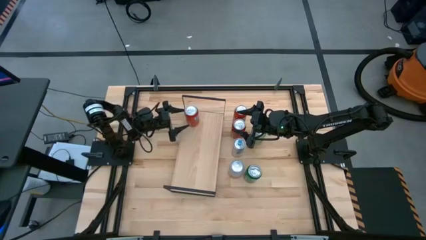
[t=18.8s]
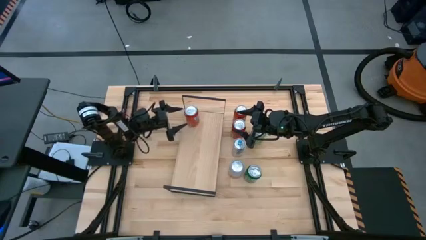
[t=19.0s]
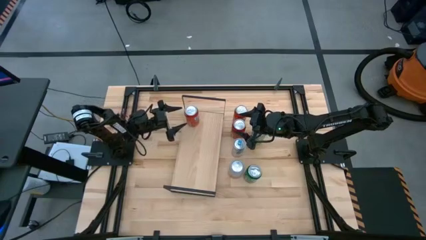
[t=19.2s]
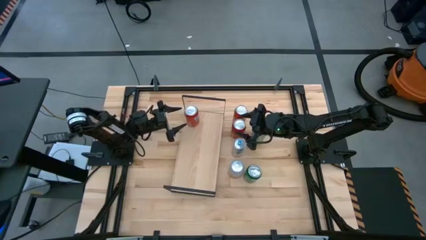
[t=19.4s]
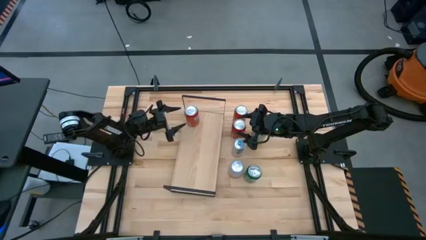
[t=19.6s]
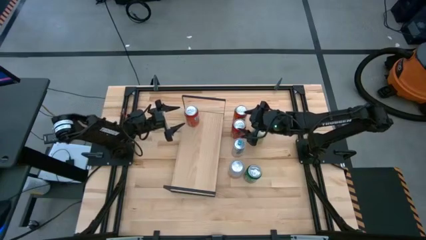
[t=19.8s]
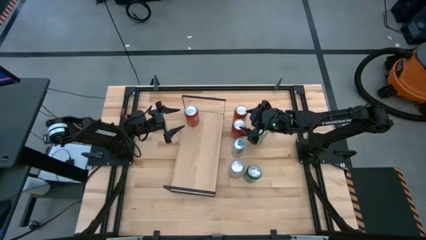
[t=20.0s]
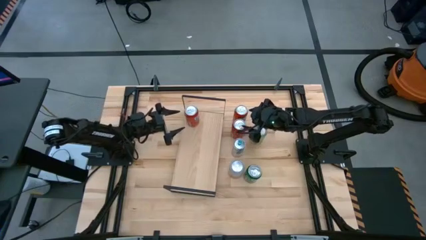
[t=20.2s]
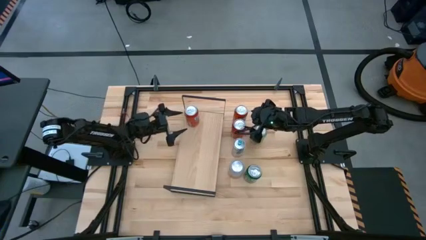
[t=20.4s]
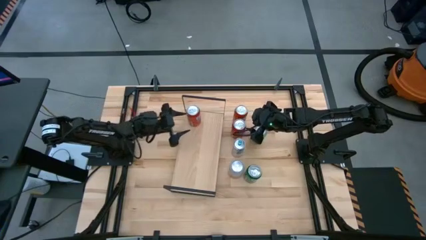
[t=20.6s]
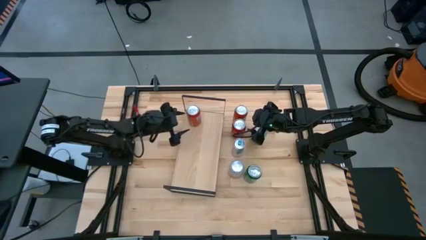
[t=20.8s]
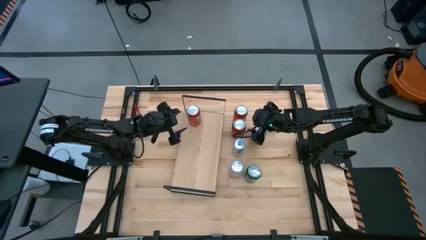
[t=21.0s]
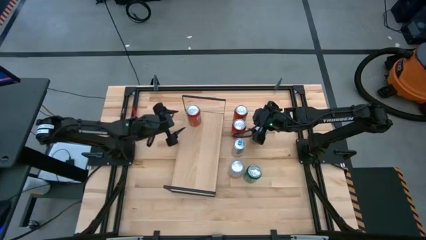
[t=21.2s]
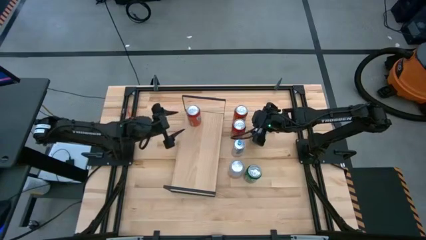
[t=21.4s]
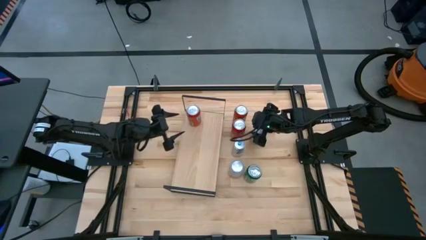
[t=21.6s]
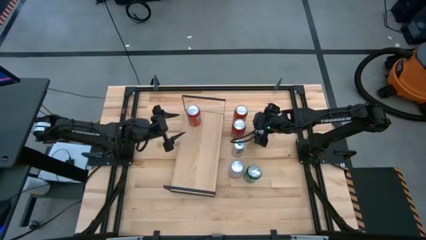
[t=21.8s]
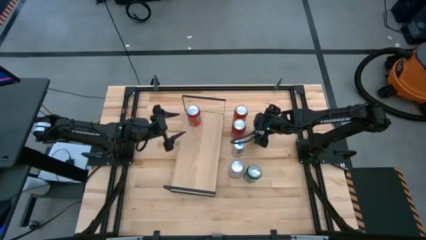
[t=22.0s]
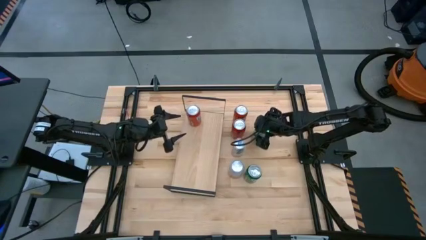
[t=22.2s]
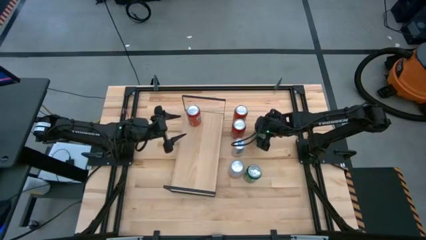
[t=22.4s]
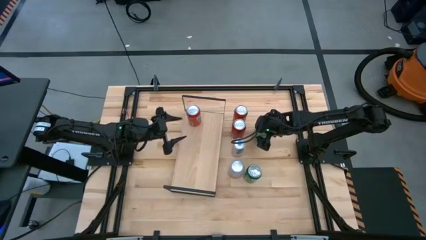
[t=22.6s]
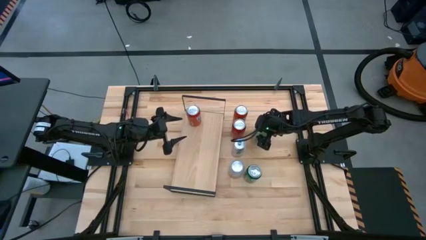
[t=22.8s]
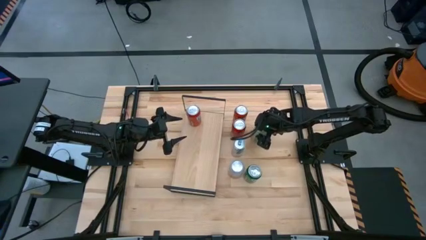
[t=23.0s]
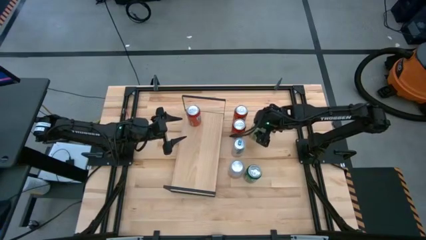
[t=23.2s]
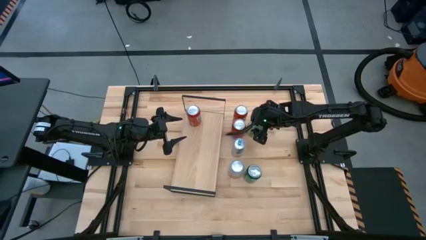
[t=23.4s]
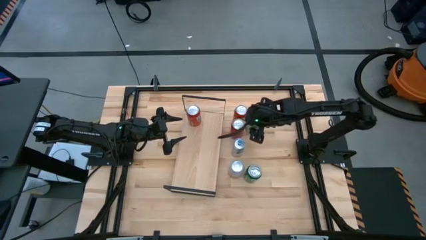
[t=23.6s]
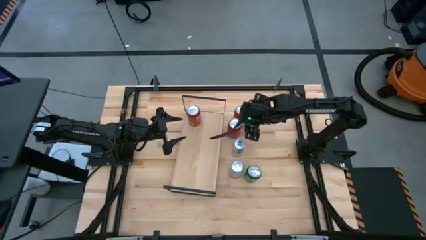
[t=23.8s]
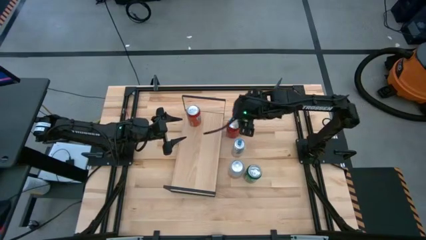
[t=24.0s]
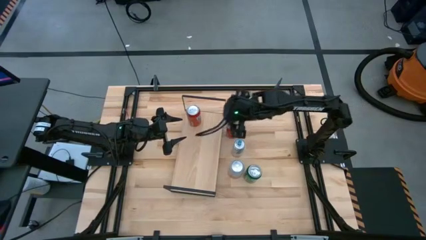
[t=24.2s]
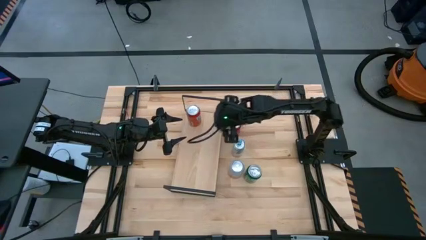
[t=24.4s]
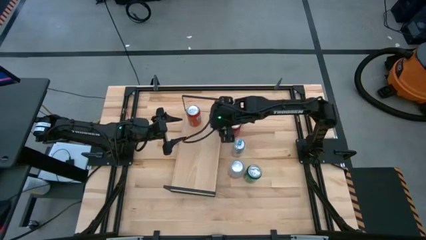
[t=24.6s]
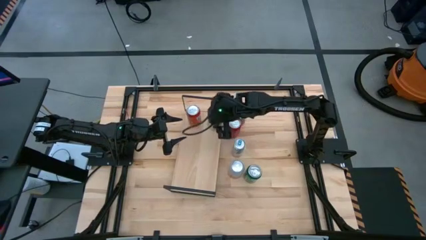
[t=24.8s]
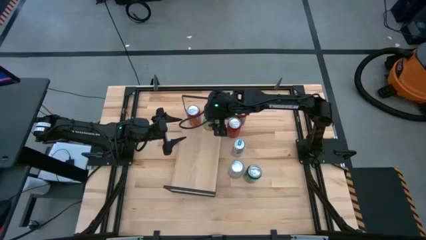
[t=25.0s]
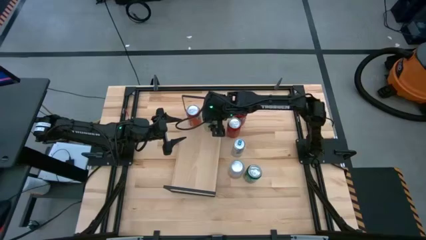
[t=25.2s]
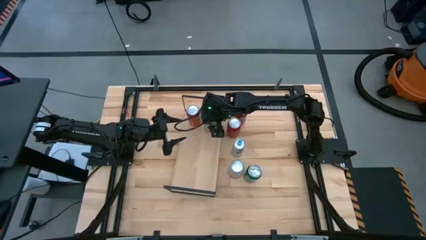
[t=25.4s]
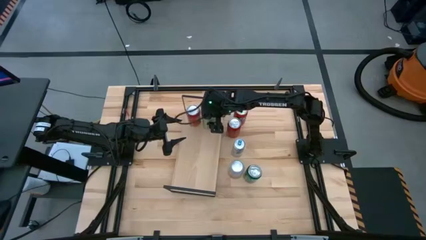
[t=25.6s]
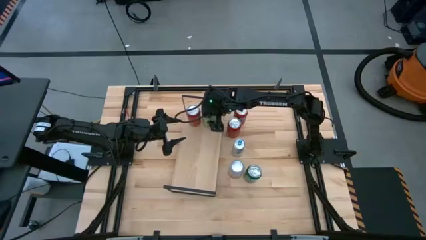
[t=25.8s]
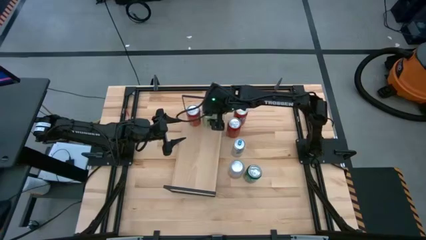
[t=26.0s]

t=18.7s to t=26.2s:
Task: Place canned beverage on shelf
Put the light green soda can on the shelf

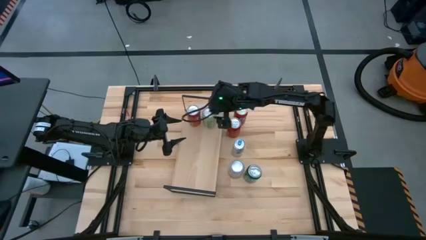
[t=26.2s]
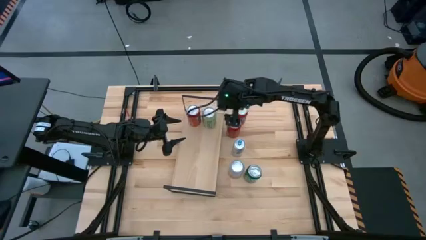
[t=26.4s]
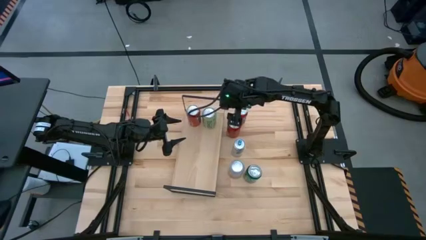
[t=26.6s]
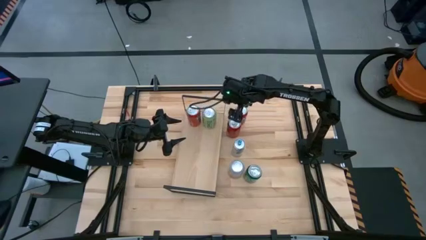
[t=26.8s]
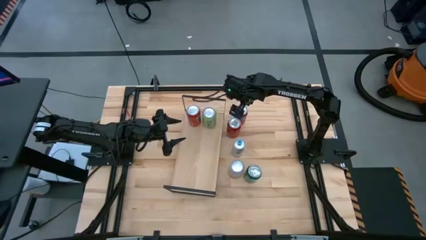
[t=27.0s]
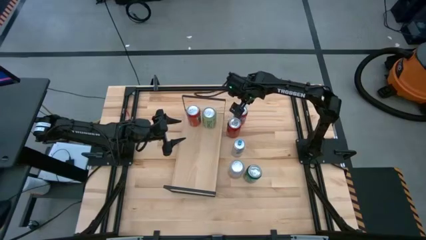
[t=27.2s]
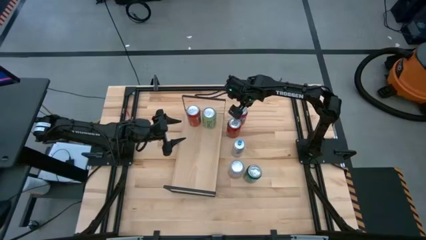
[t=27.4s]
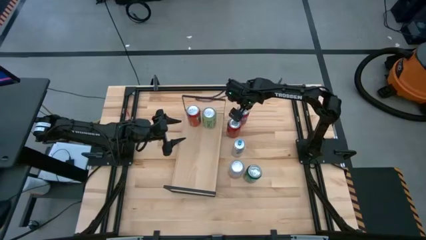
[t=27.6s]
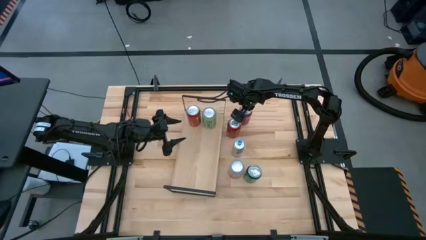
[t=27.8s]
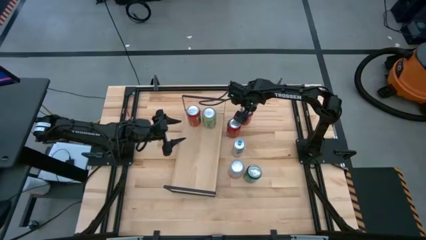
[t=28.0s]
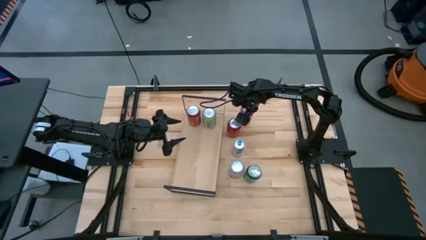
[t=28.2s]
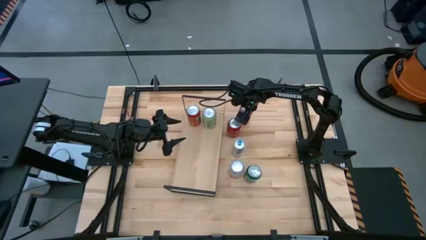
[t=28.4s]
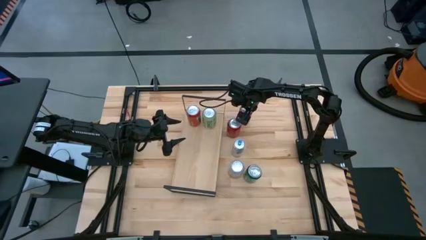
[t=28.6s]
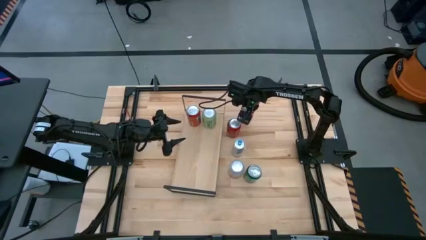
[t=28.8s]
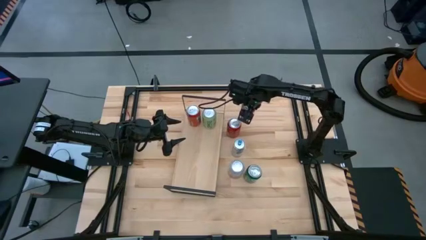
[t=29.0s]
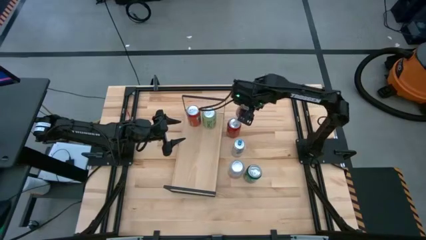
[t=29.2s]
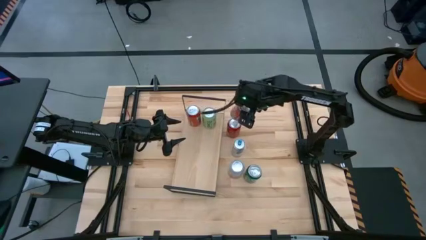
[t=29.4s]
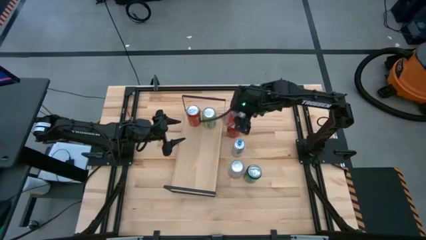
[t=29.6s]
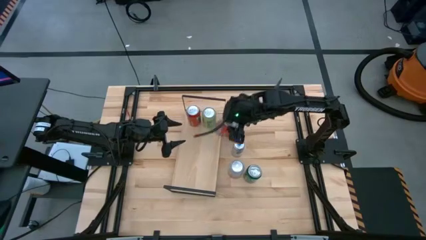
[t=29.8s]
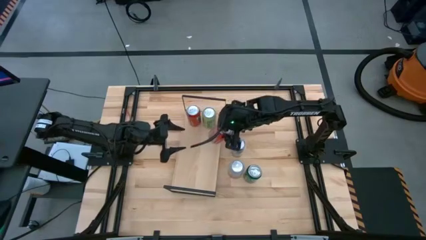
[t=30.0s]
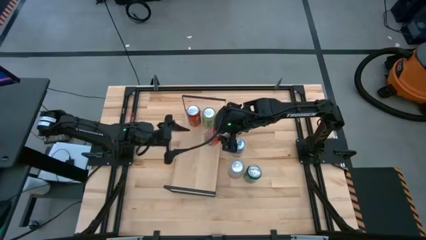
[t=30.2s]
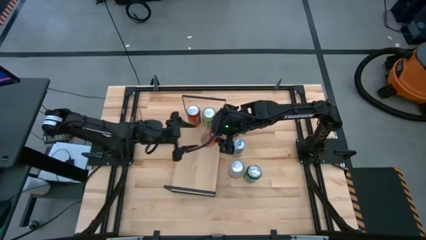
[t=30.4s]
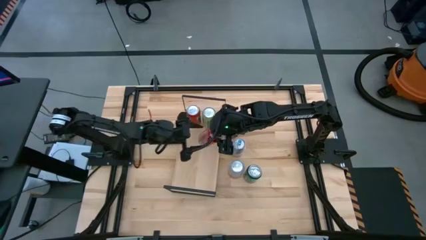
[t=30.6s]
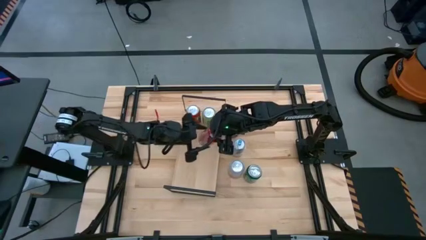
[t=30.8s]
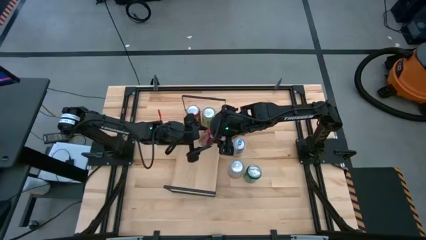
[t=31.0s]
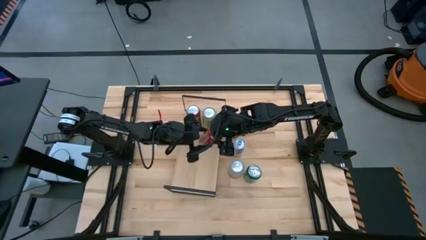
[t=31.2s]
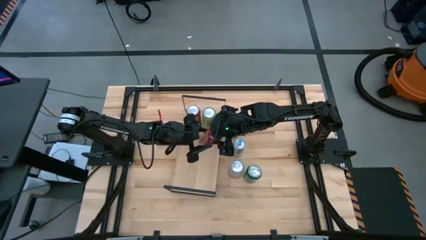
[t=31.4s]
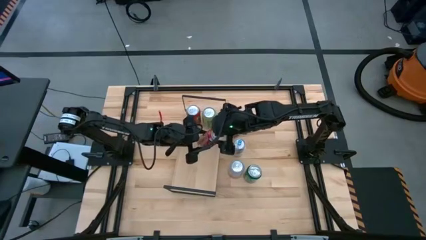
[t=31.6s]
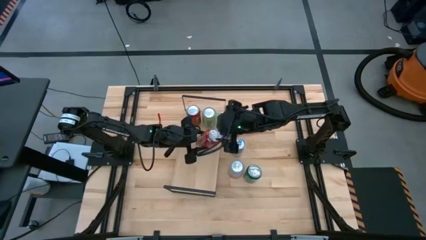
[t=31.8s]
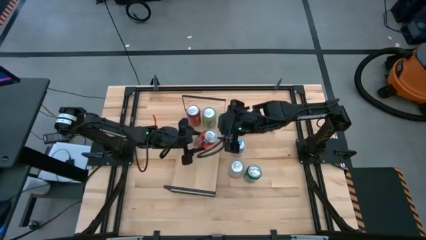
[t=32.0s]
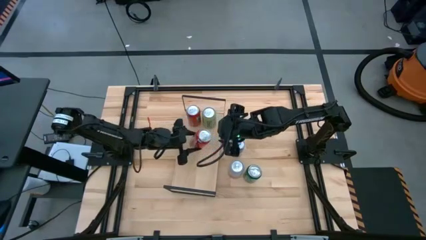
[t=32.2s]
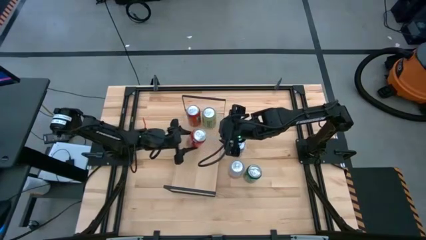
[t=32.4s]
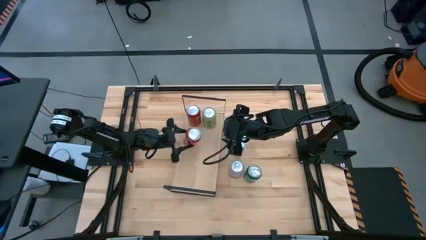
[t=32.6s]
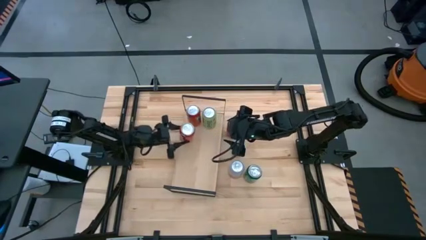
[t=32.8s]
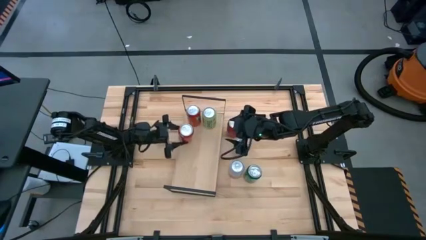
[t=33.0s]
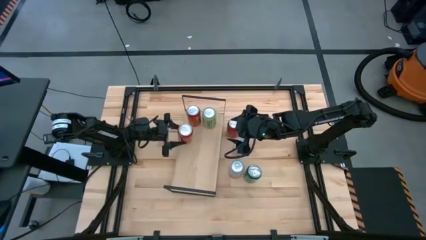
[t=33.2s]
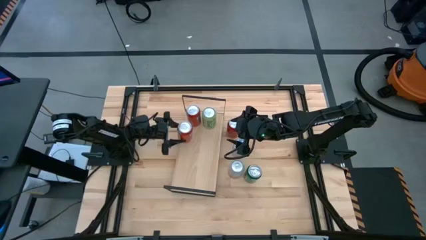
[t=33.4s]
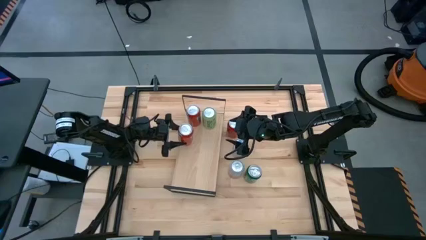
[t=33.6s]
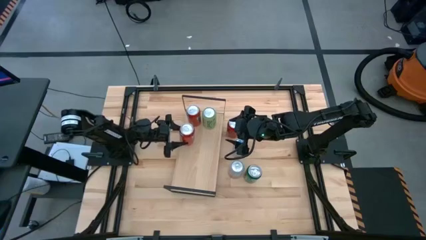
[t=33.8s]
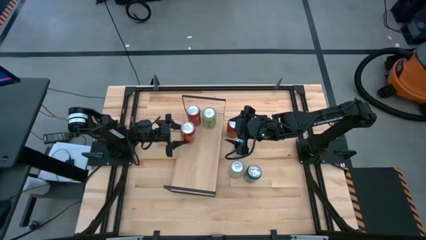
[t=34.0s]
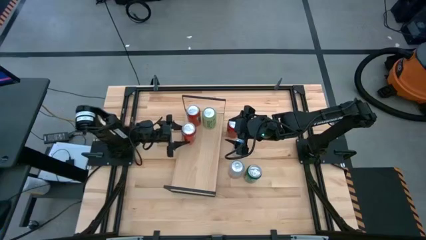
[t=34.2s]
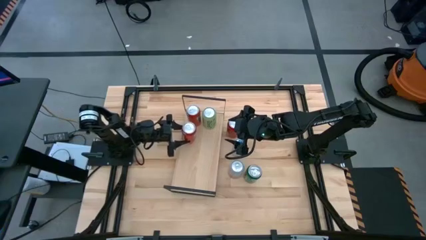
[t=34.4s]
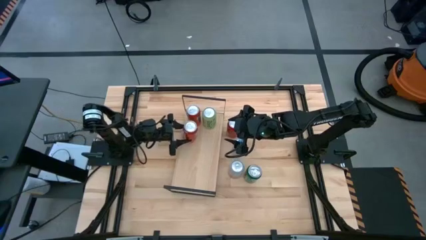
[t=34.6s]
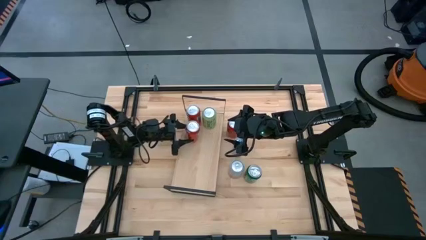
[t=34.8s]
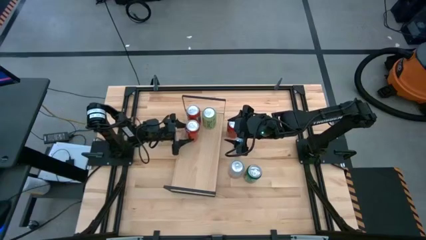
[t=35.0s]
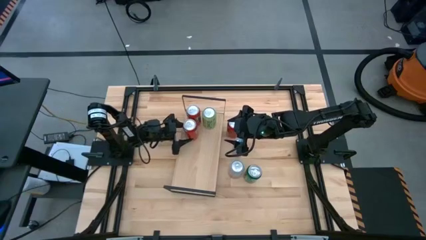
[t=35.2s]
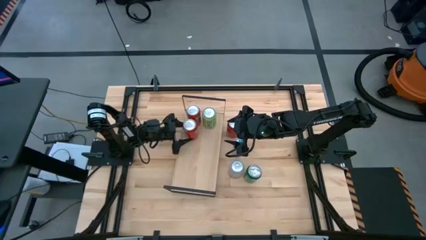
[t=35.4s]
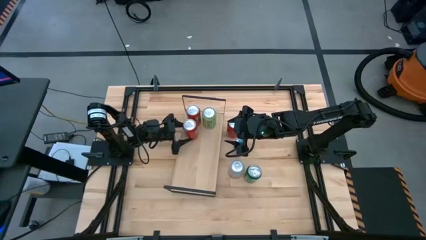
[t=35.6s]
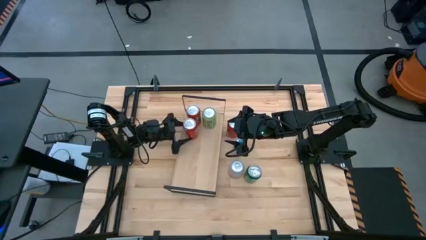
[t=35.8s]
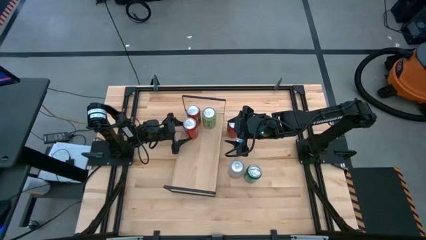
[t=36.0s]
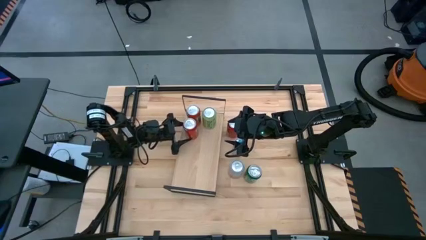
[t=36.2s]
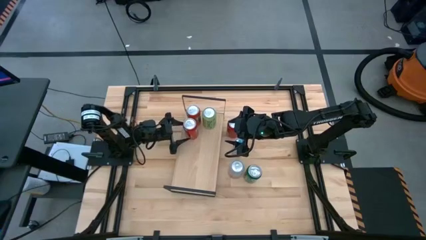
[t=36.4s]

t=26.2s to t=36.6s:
Put the orange soda can on the shelf
